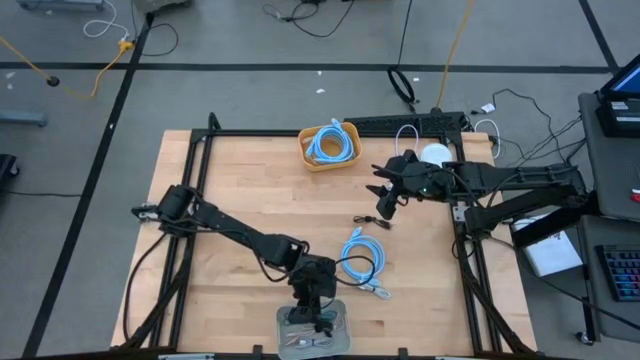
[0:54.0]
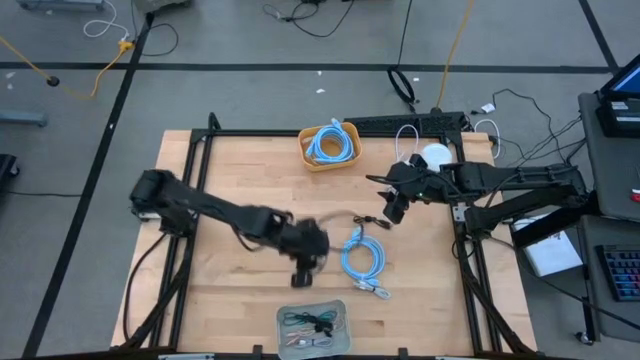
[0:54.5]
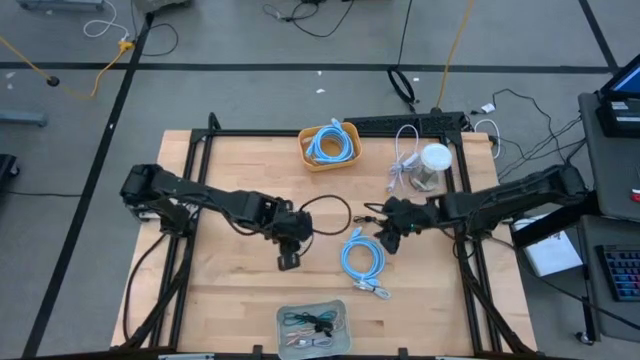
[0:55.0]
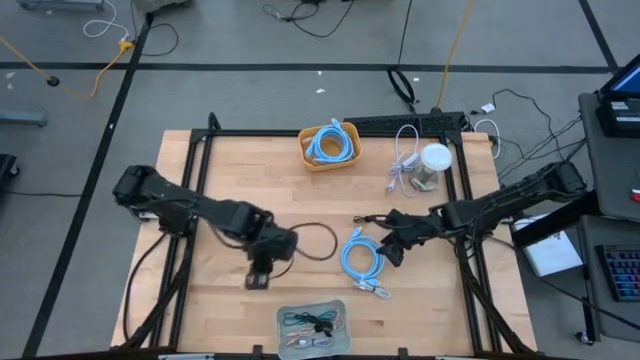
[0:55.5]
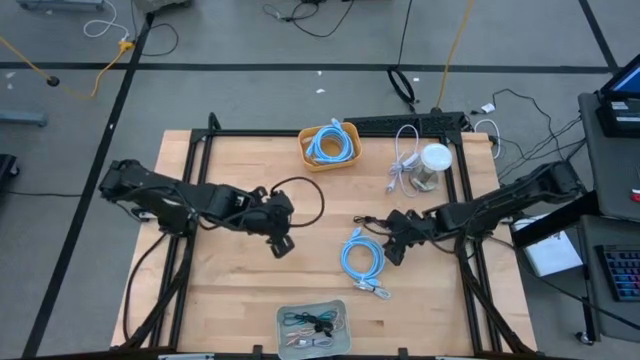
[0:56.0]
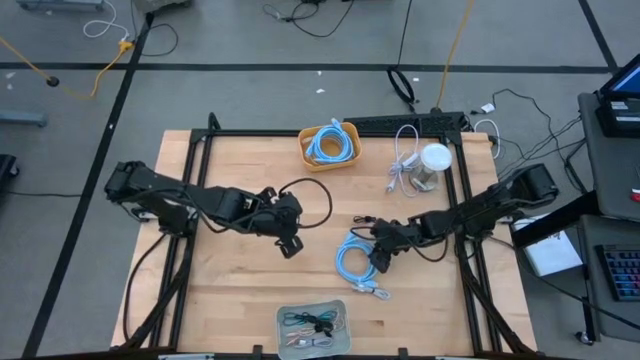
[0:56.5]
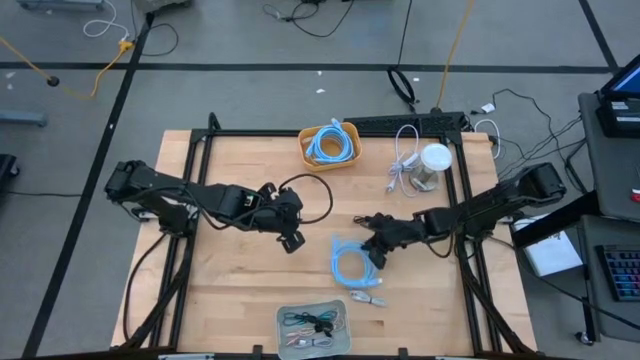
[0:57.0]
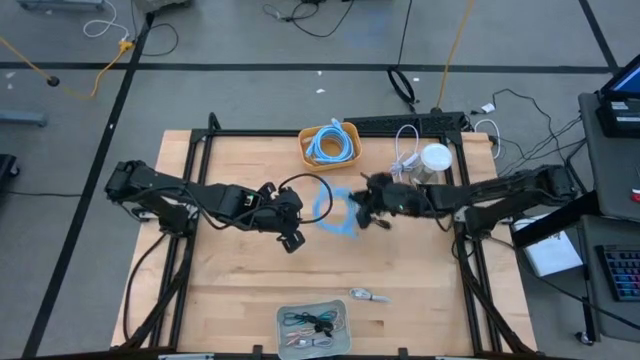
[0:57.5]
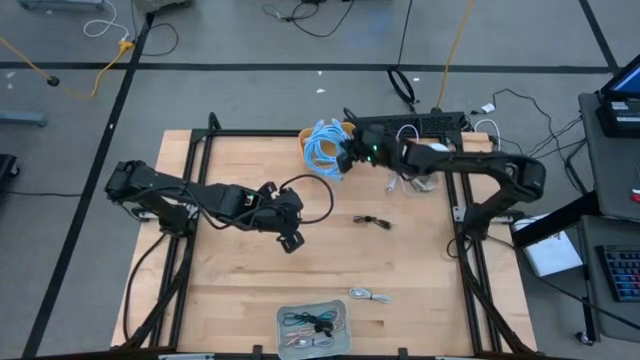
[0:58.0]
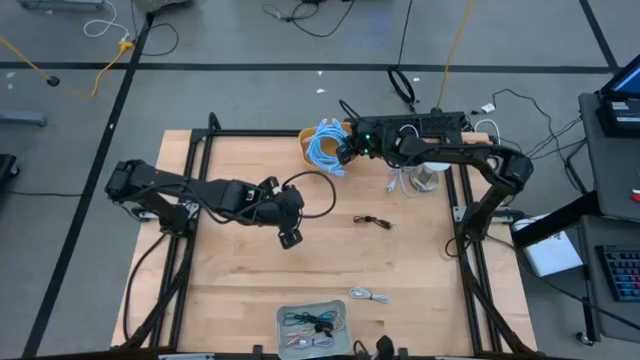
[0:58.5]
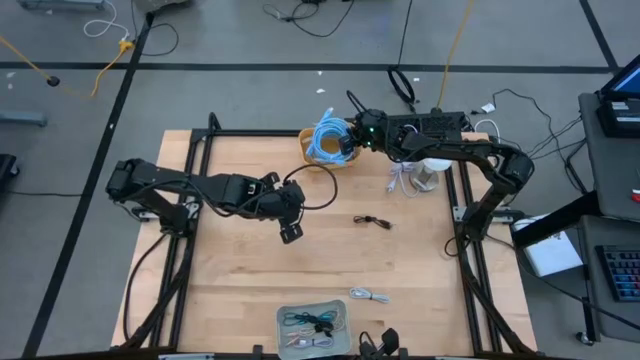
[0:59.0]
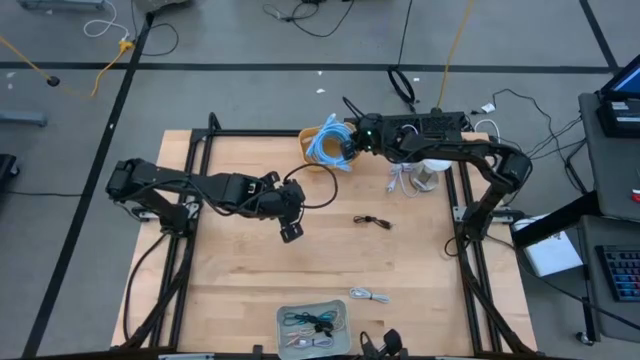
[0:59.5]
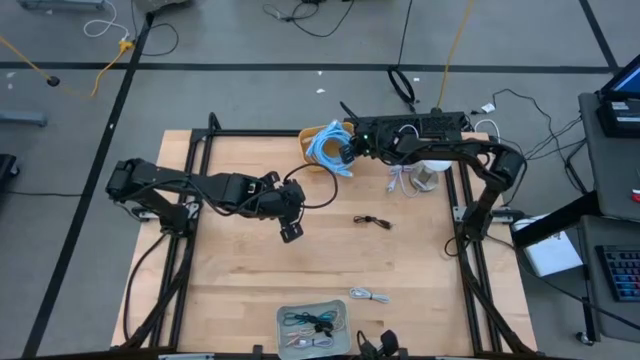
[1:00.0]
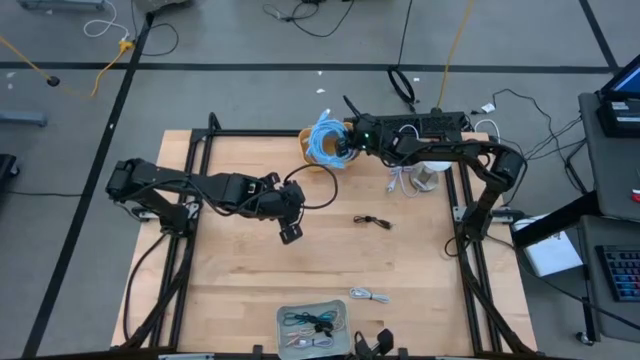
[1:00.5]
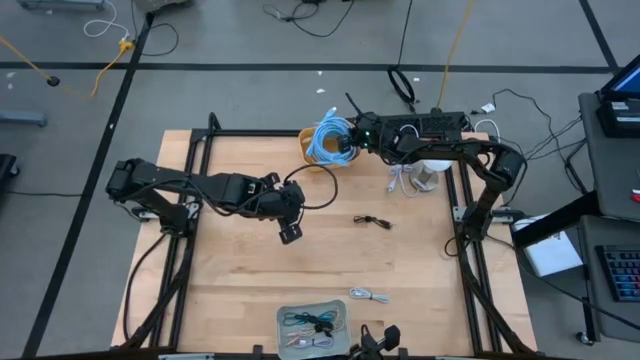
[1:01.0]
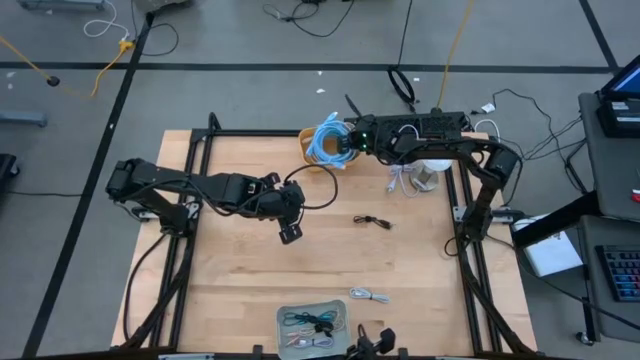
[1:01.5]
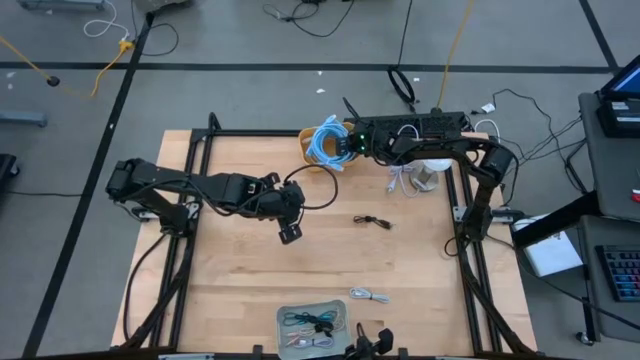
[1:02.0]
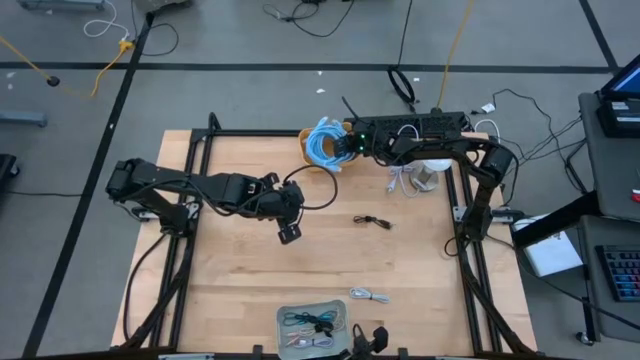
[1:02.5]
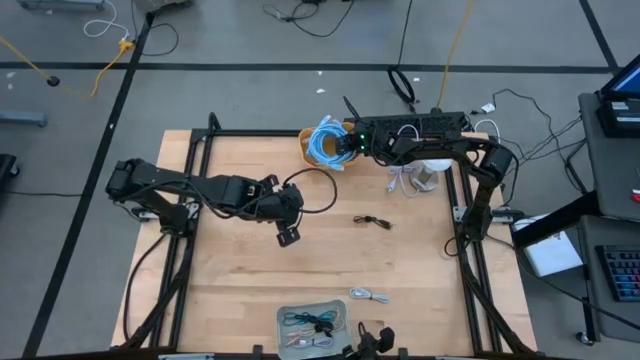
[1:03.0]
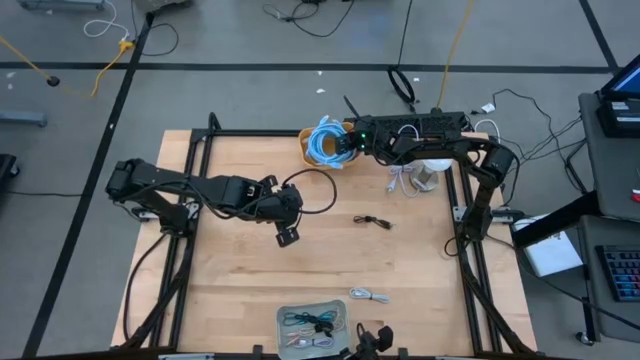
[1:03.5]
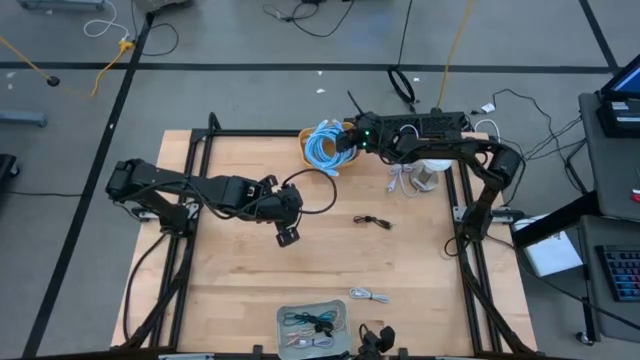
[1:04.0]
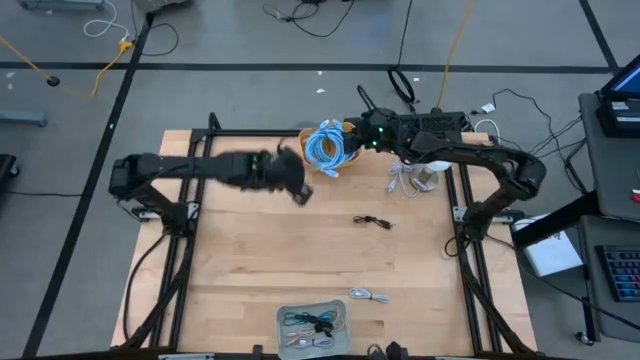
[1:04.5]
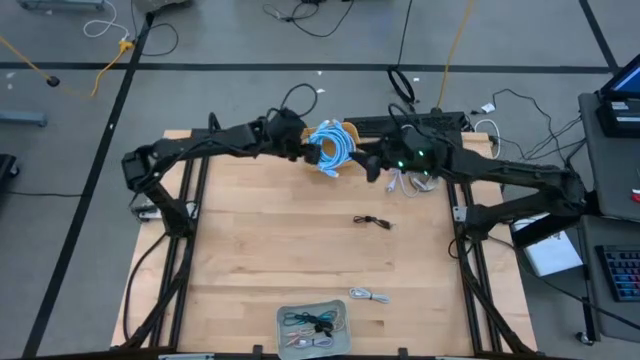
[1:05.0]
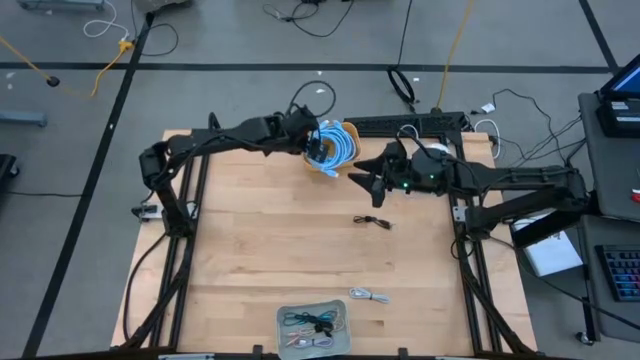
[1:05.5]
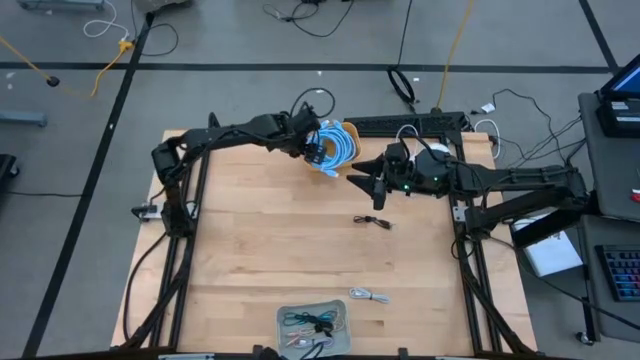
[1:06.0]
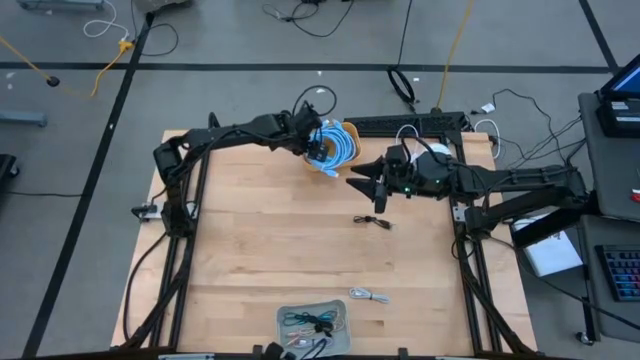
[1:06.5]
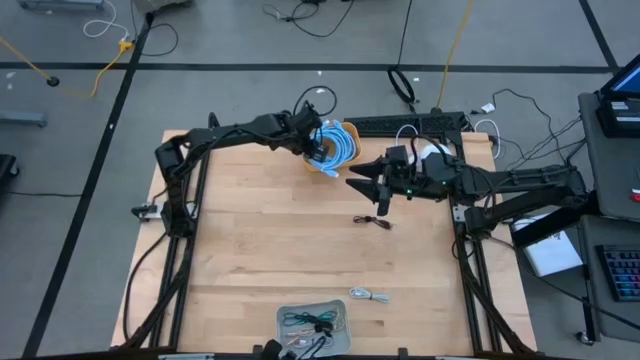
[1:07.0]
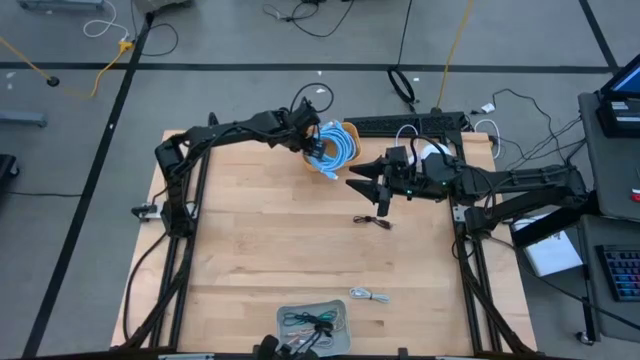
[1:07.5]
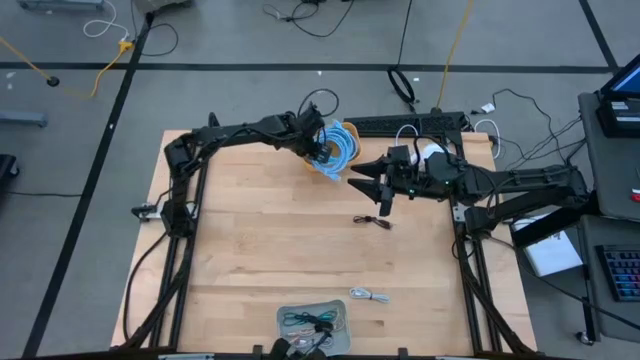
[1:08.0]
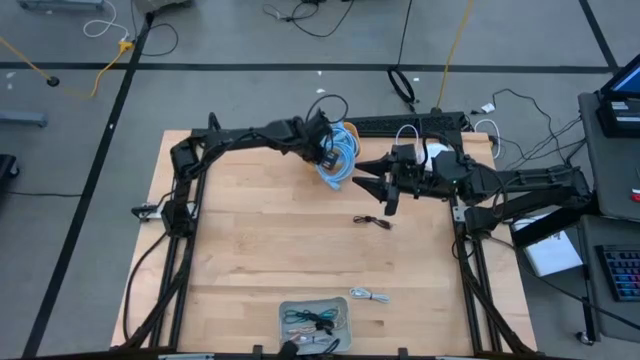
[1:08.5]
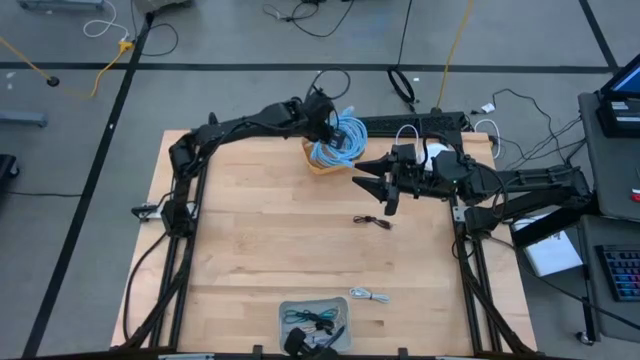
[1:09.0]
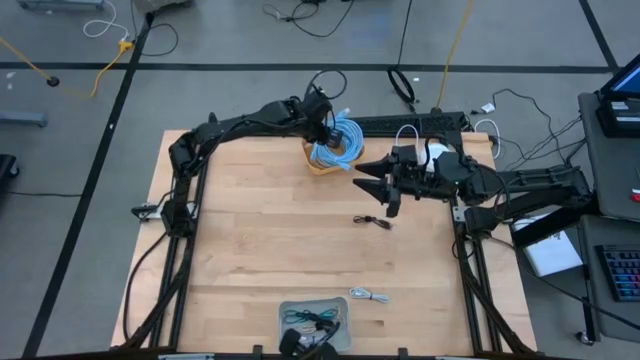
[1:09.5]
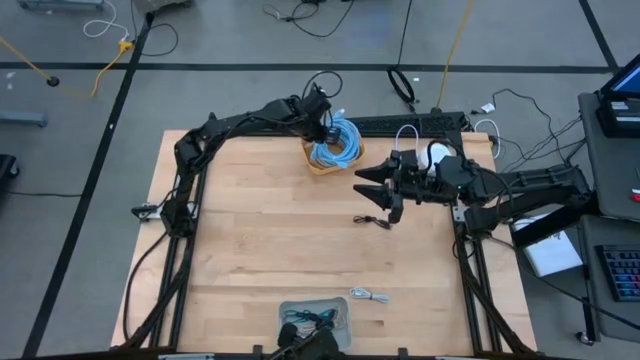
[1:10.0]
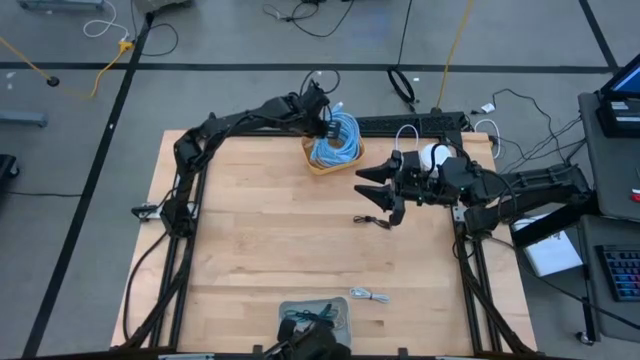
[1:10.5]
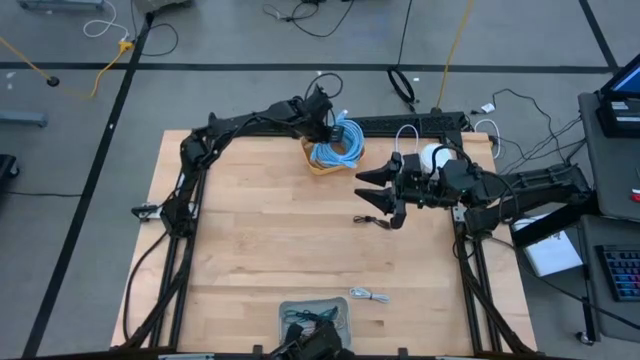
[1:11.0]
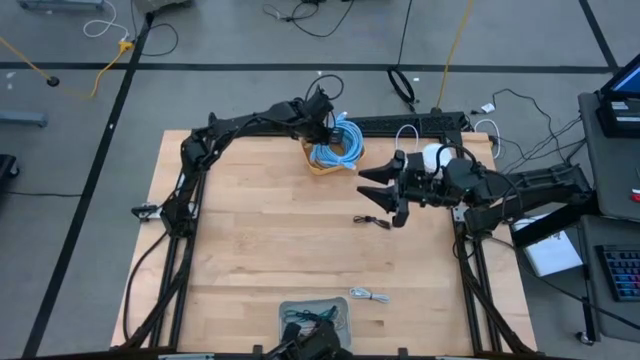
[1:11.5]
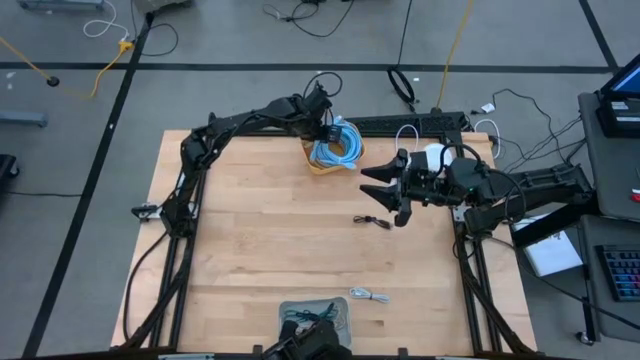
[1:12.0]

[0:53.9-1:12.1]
Task: Pick & Place USB Port
Put the HDMI cable into the yellow bin

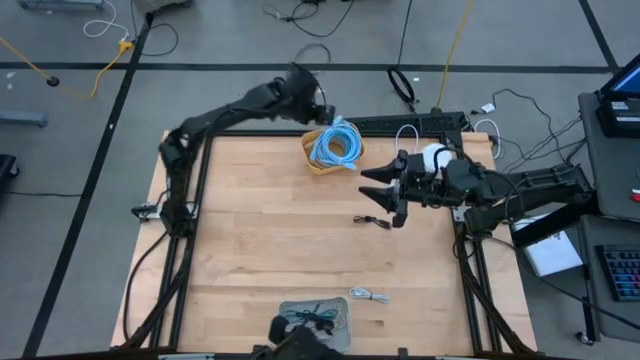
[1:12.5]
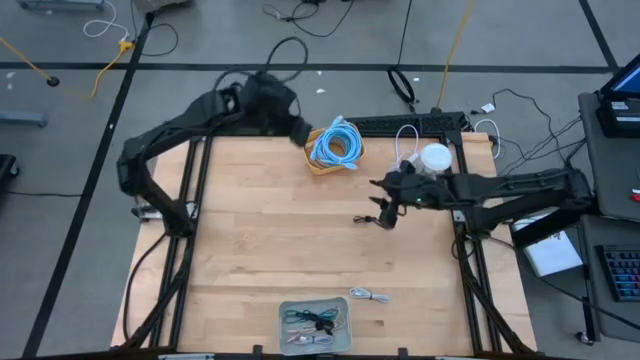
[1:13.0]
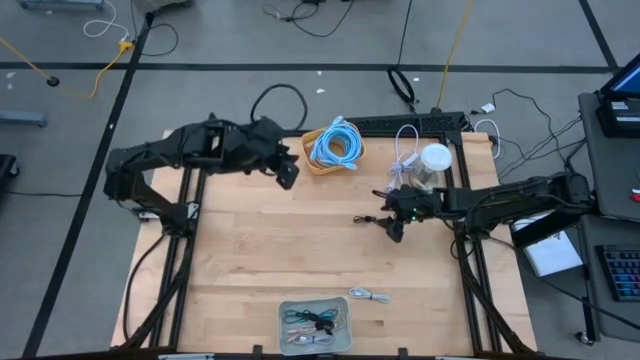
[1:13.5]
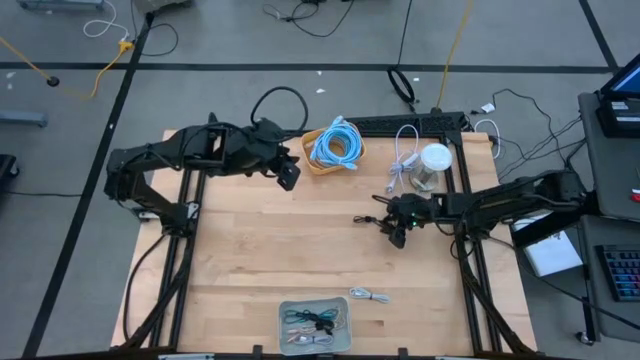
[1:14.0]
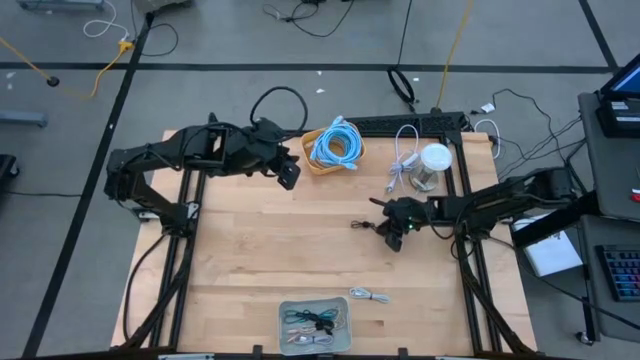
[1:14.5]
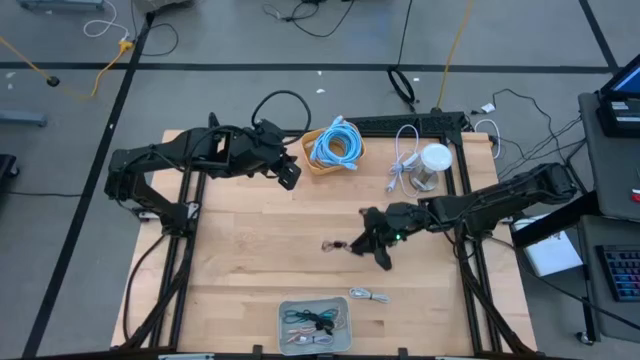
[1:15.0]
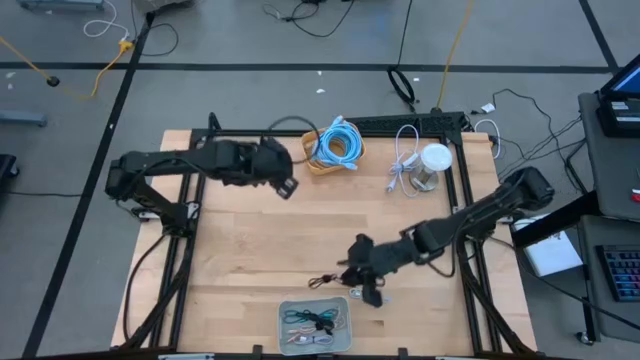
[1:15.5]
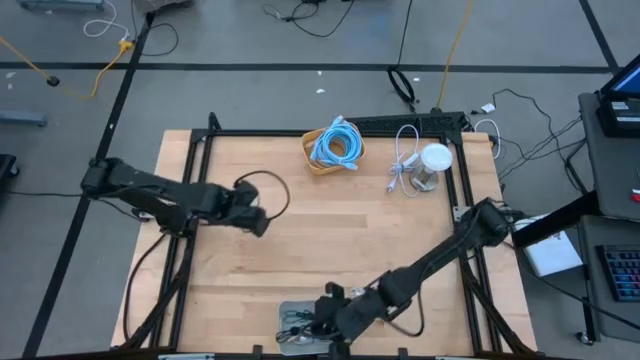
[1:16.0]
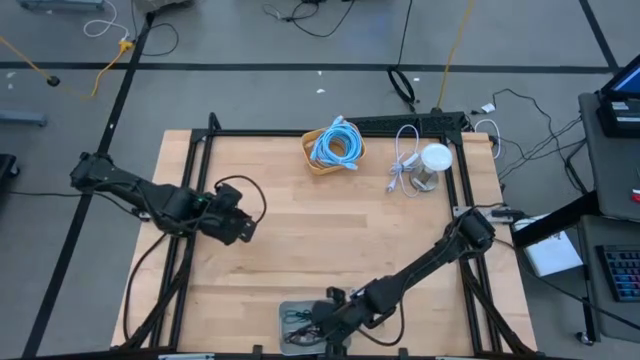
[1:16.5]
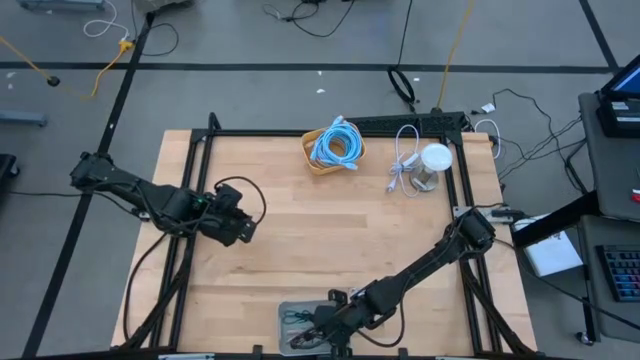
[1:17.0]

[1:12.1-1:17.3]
Put the black charger cable into the gray bin
